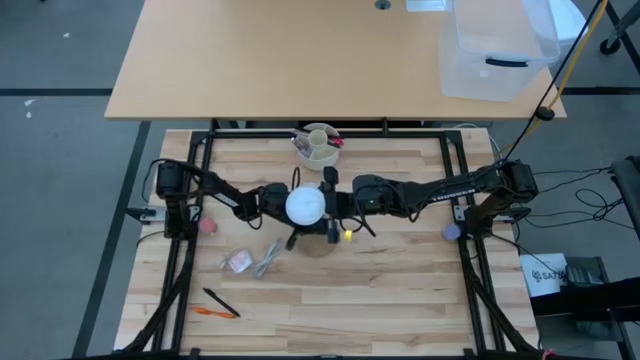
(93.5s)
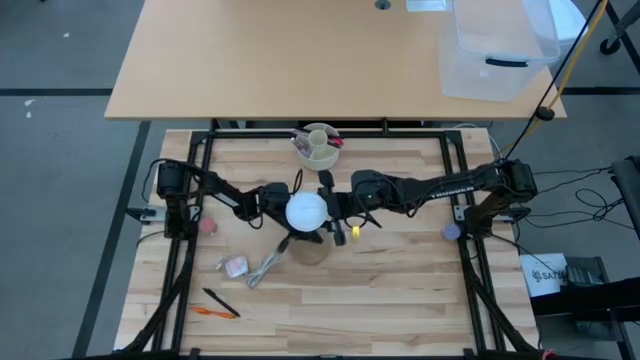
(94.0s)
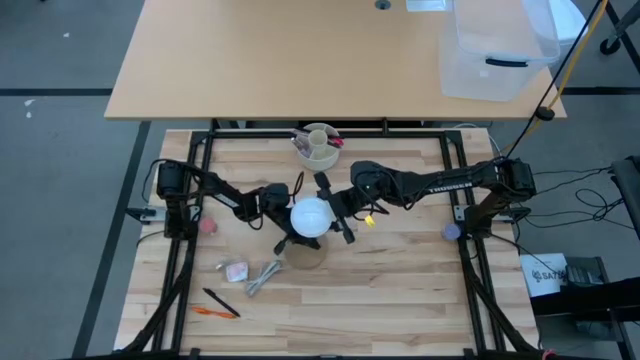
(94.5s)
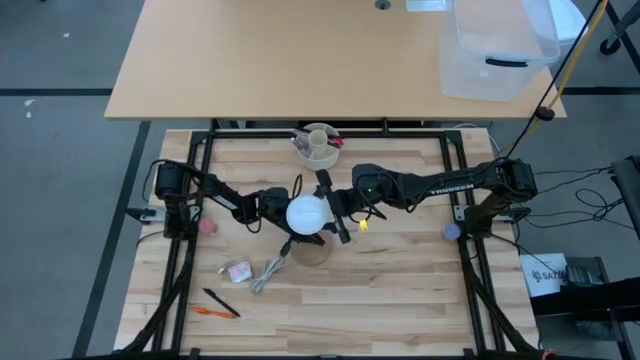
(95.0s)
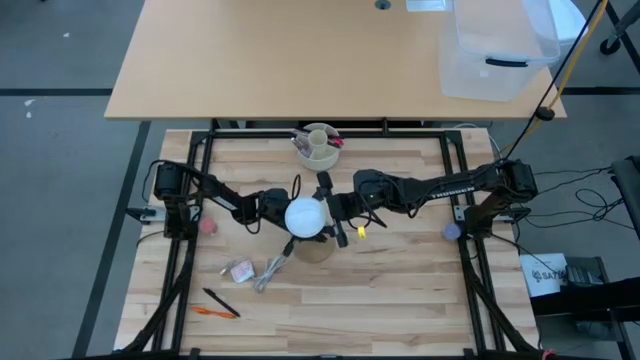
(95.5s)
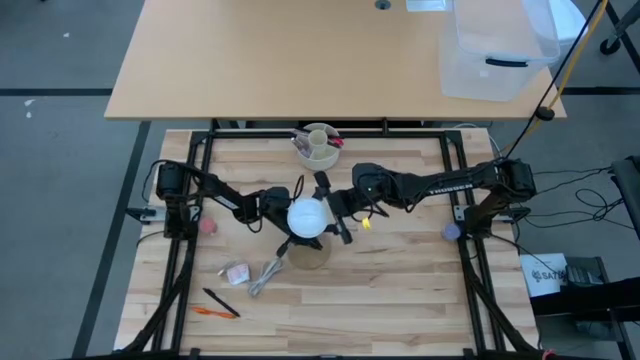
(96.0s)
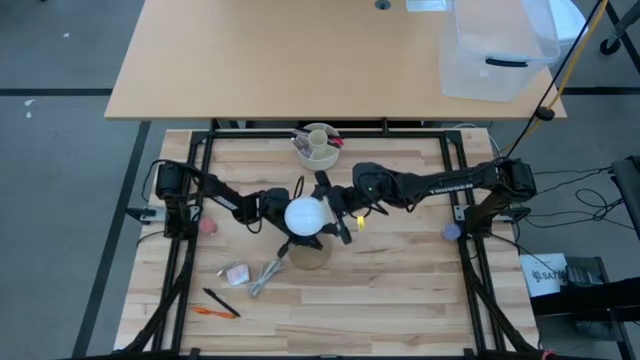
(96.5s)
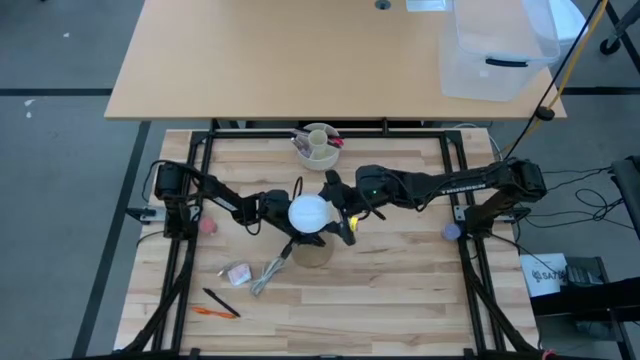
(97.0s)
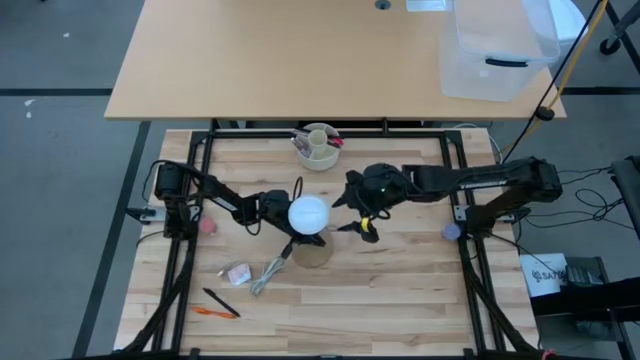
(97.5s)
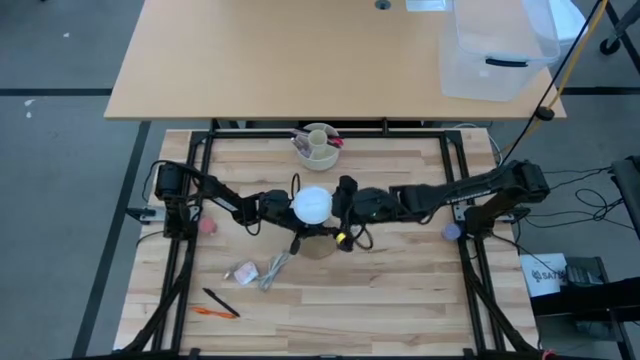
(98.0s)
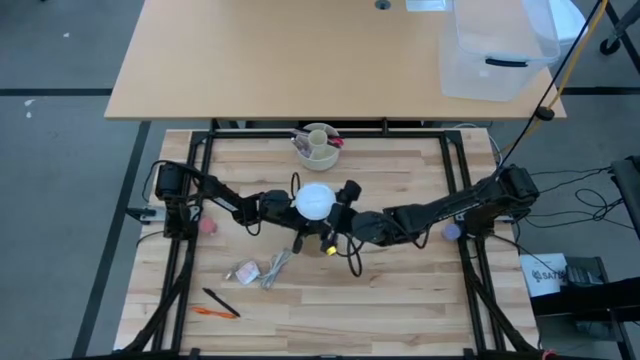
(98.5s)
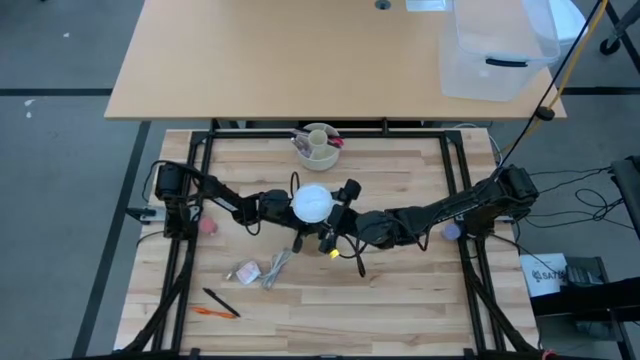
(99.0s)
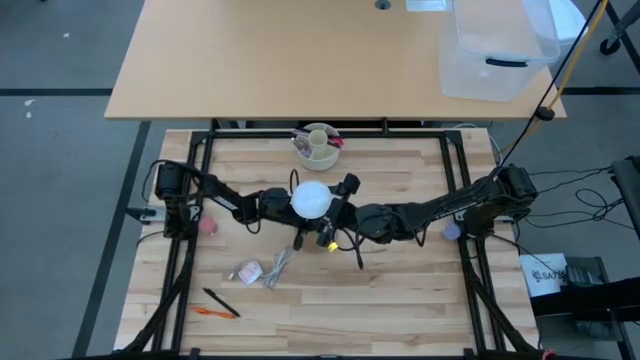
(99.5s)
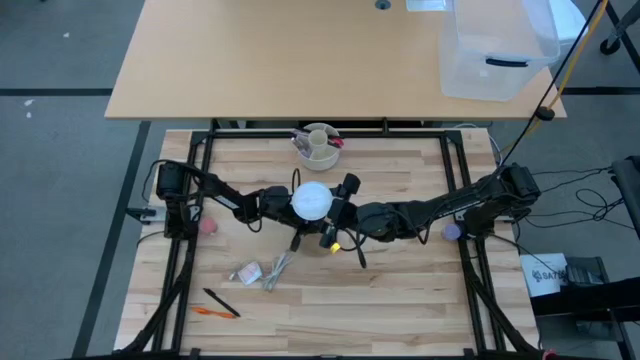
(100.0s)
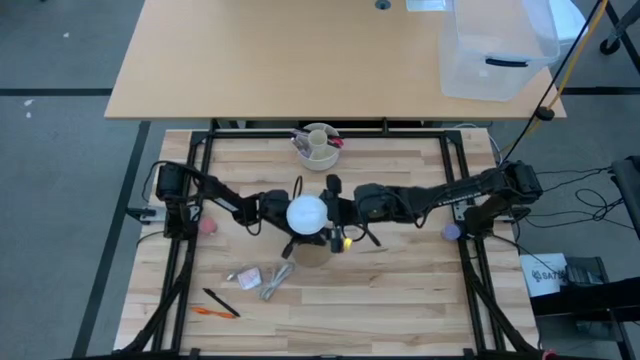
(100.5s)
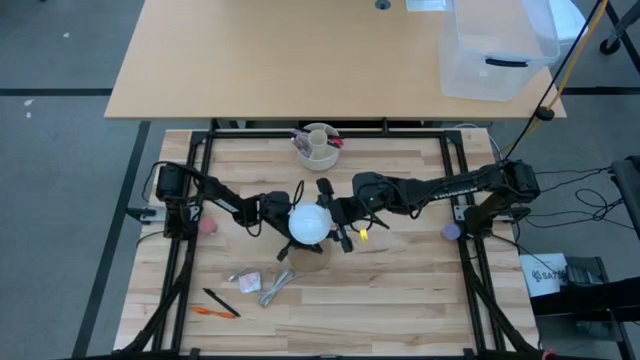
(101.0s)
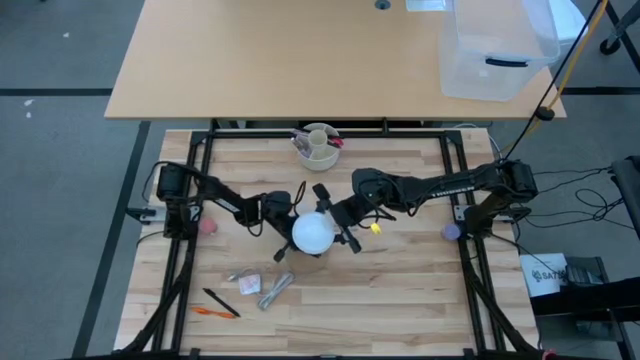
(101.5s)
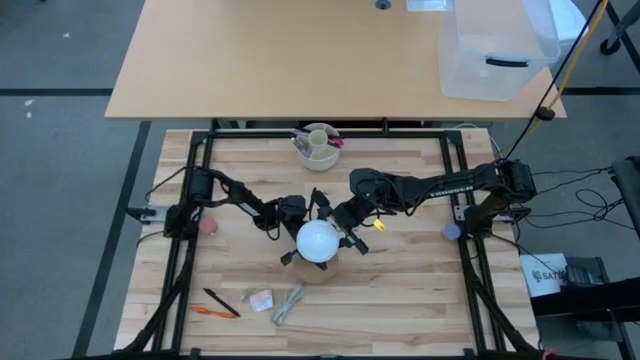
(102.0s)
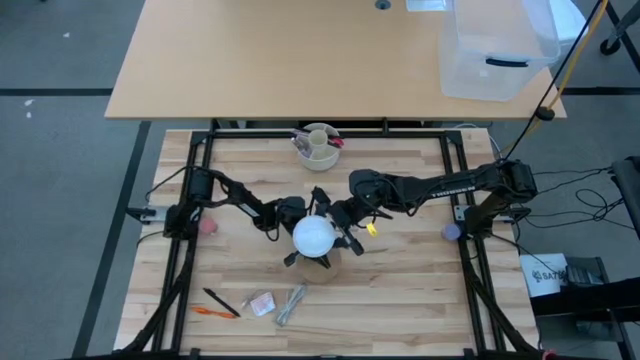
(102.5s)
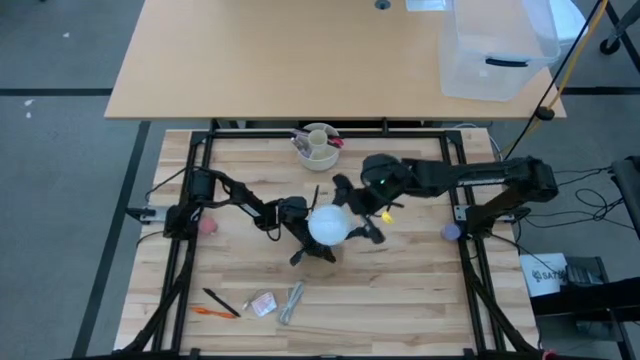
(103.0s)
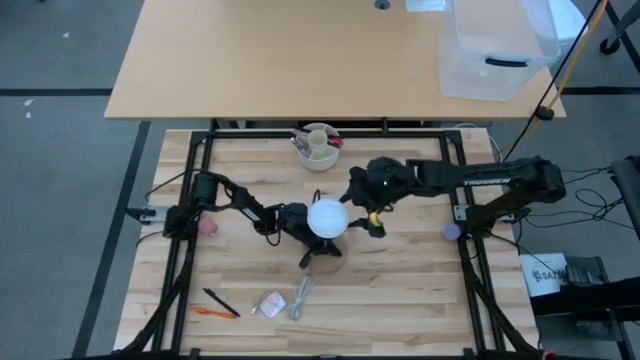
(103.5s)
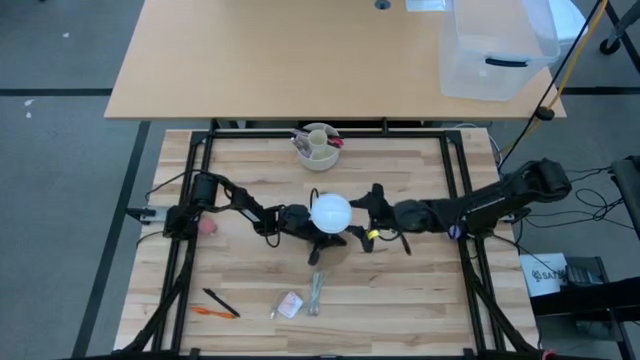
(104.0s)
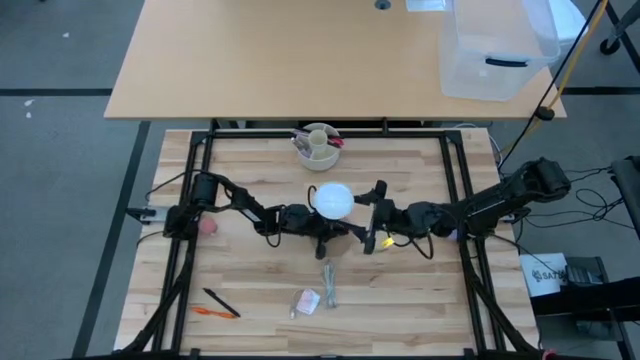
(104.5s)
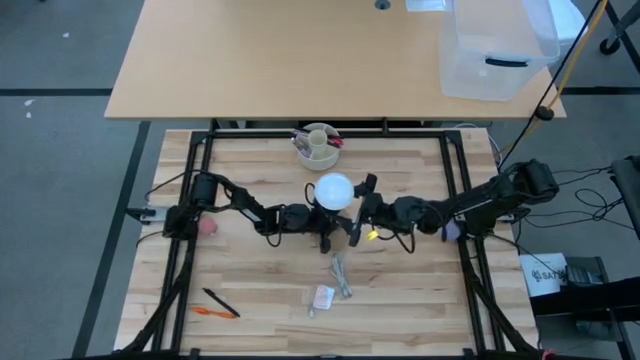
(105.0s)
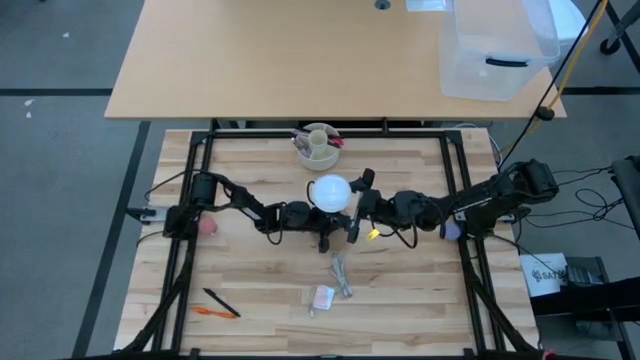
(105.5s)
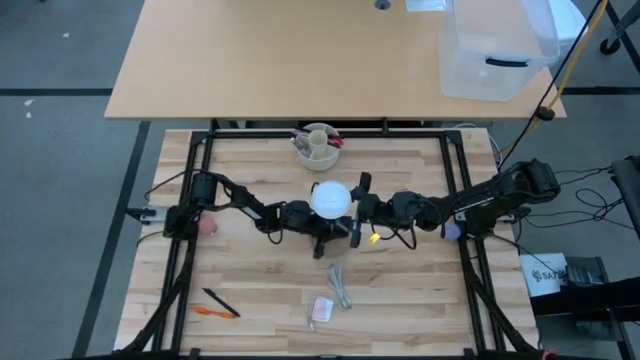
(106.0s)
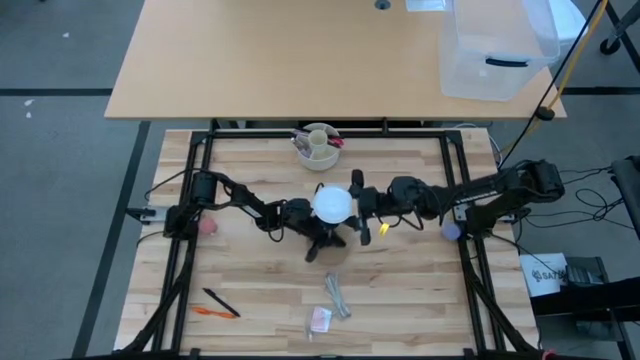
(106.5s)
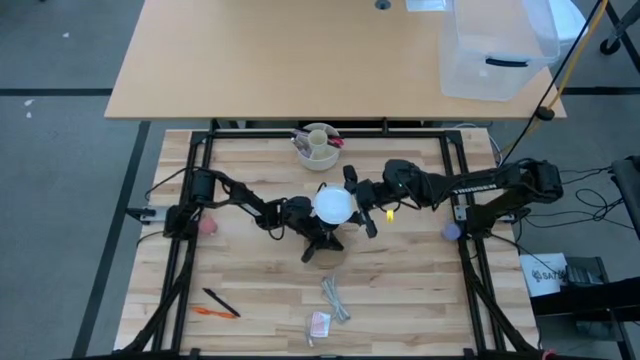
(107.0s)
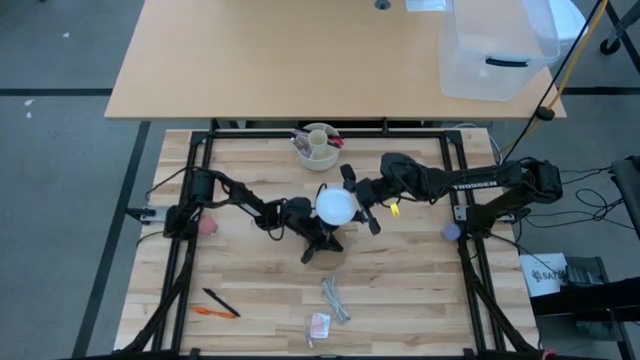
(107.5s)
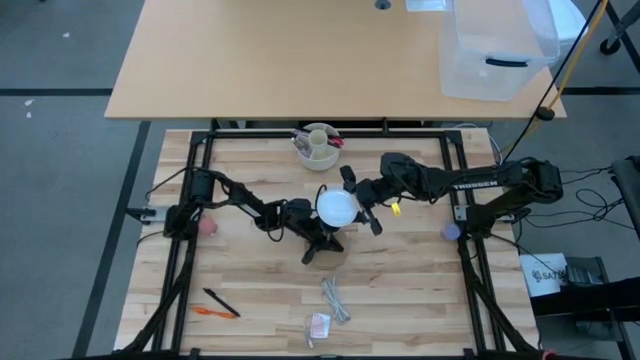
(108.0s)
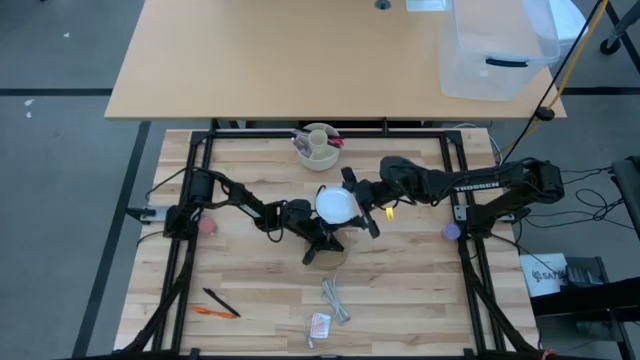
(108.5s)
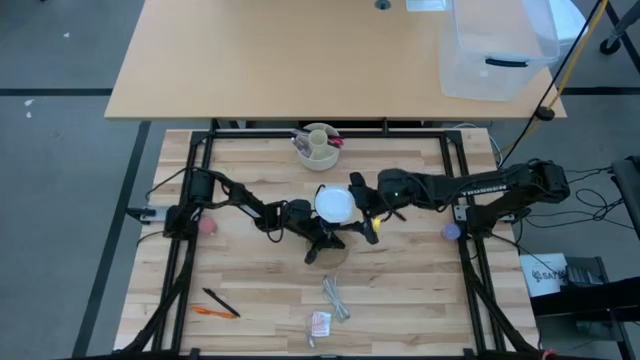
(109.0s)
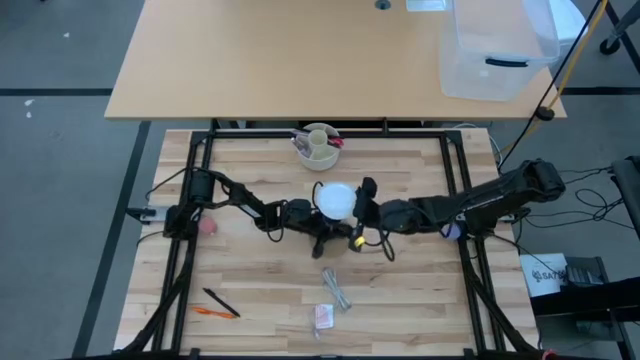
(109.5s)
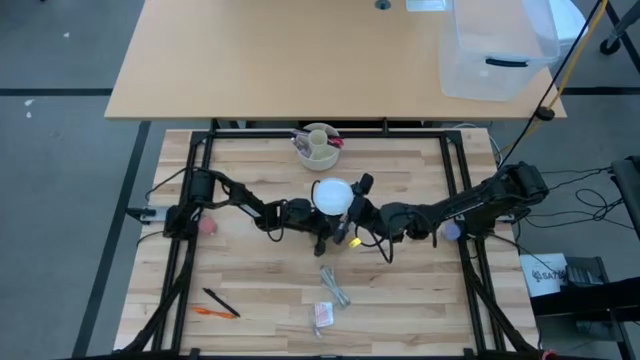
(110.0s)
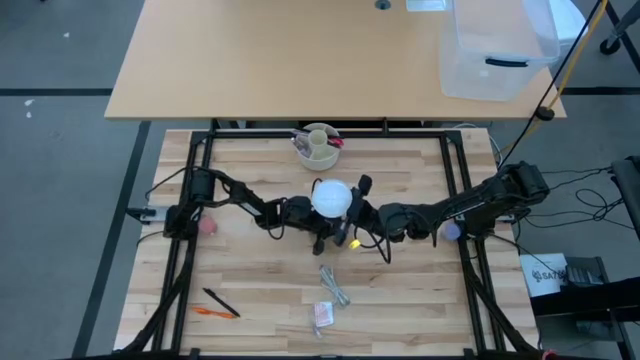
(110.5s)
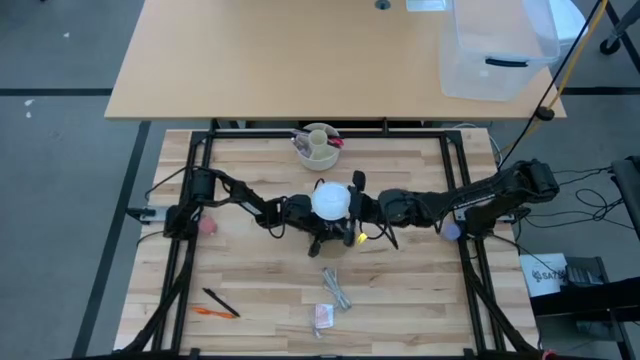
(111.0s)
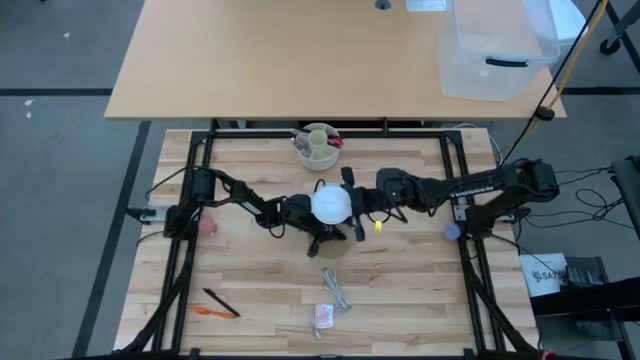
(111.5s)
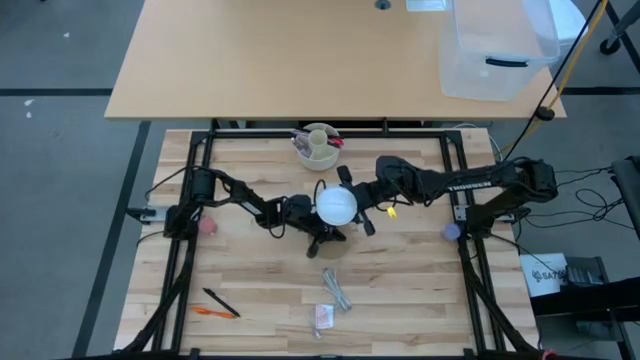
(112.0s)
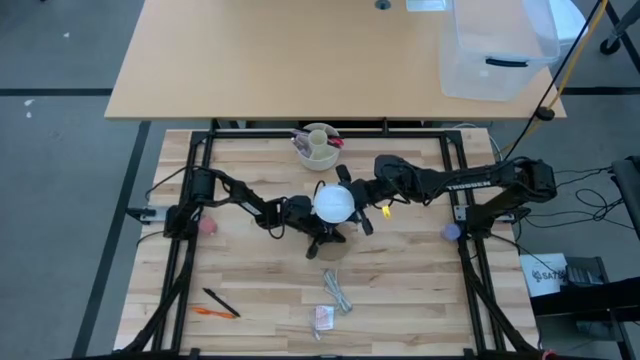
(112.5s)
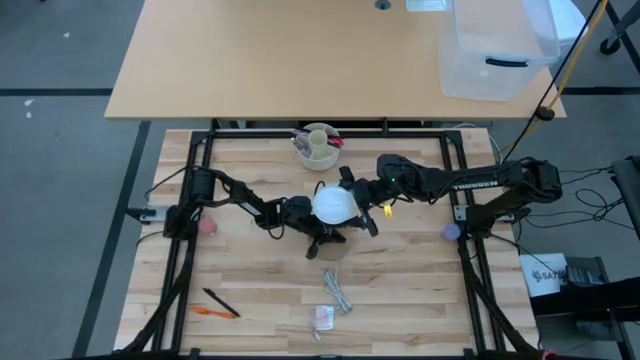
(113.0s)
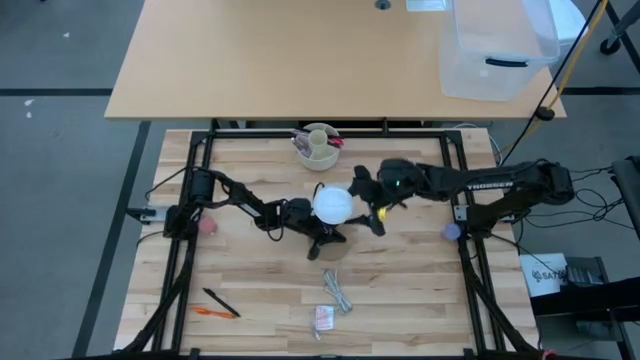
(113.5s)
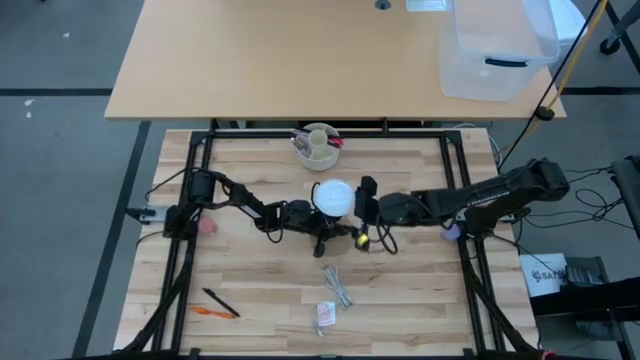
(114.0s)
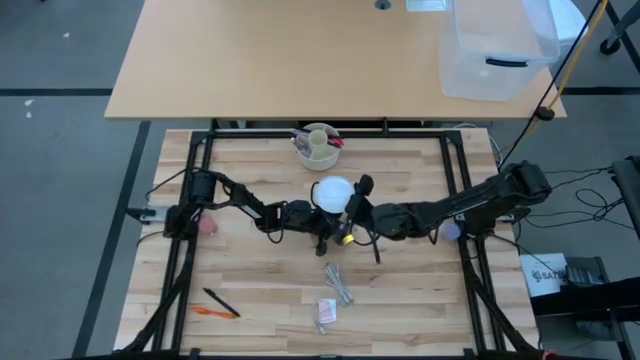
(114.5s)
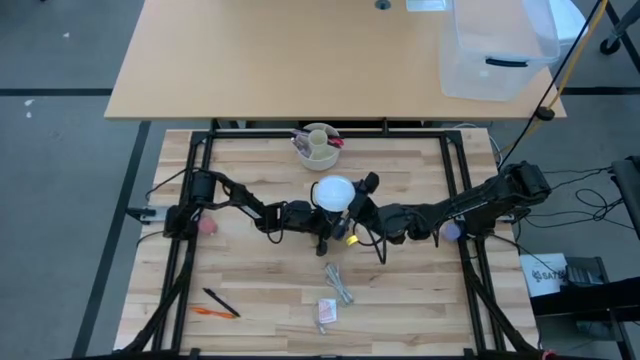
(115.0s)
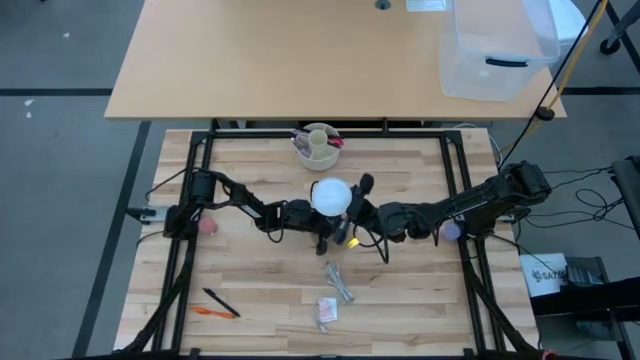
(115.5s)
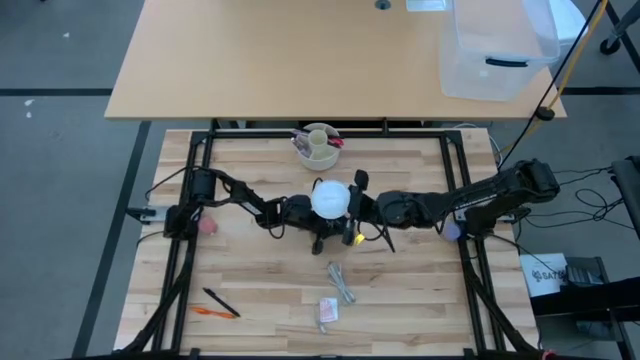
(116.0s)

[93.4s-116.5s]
Task: Screw lightbulb
Remove the lightbulb from the wooden lamp
